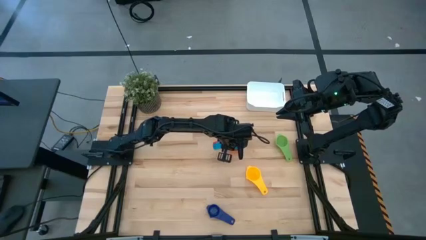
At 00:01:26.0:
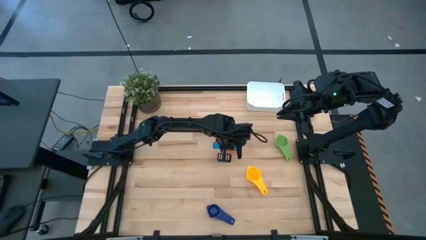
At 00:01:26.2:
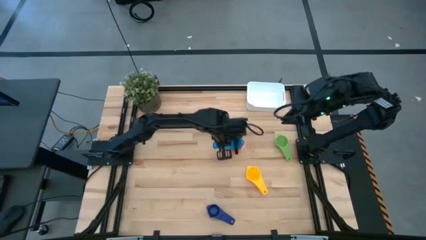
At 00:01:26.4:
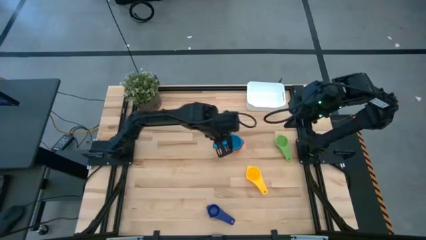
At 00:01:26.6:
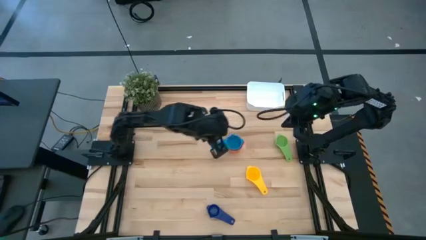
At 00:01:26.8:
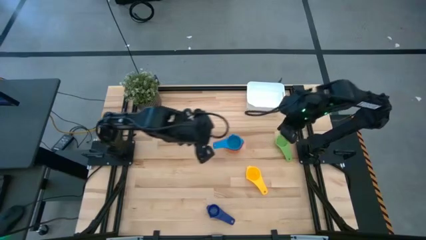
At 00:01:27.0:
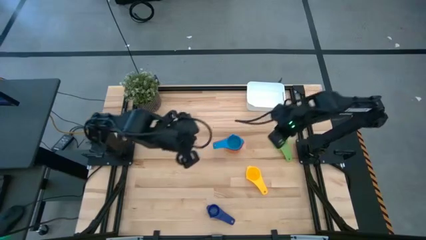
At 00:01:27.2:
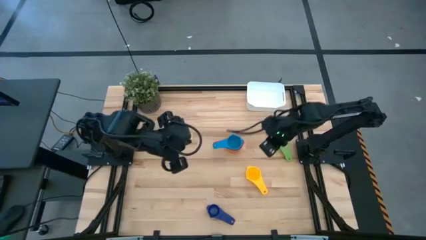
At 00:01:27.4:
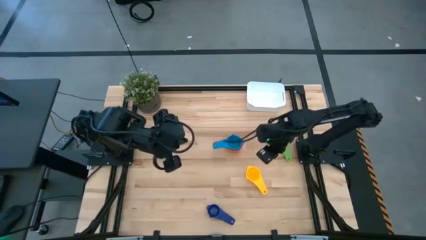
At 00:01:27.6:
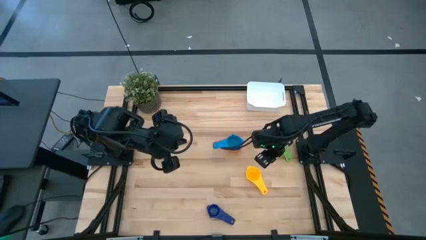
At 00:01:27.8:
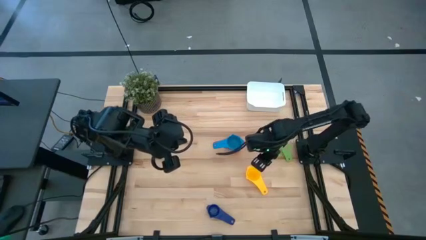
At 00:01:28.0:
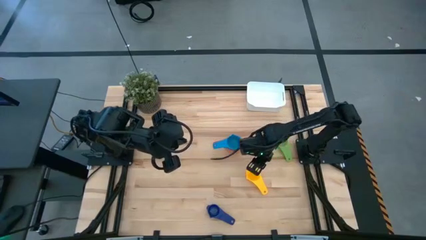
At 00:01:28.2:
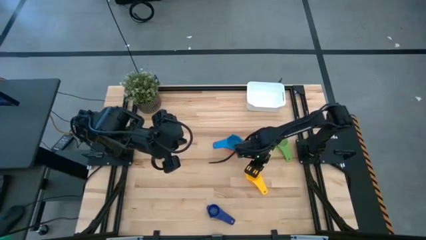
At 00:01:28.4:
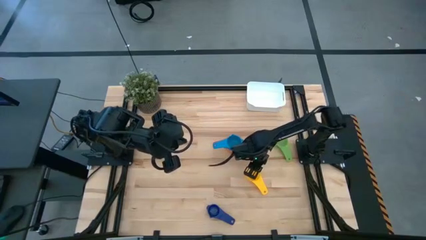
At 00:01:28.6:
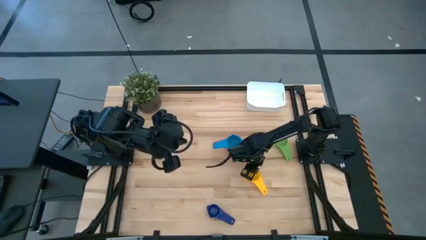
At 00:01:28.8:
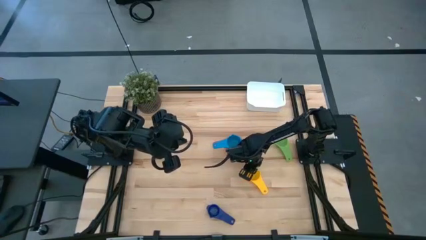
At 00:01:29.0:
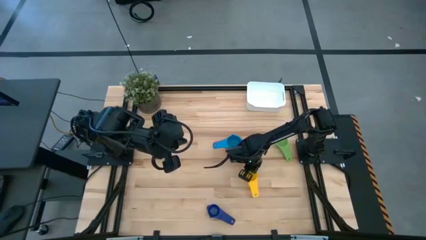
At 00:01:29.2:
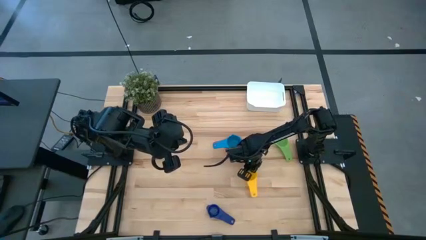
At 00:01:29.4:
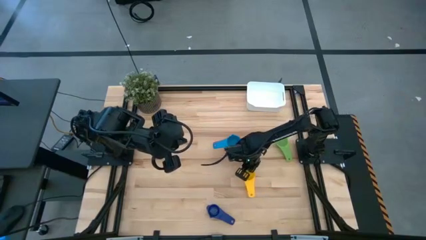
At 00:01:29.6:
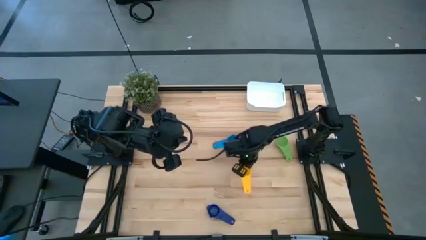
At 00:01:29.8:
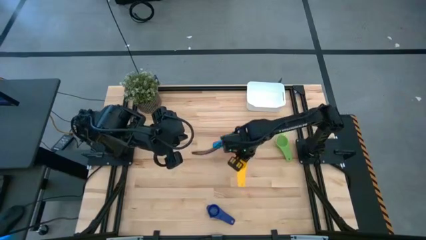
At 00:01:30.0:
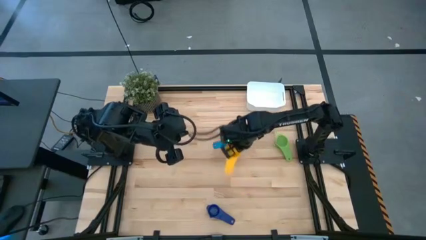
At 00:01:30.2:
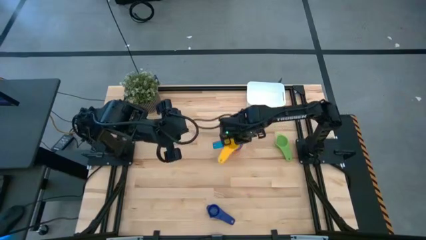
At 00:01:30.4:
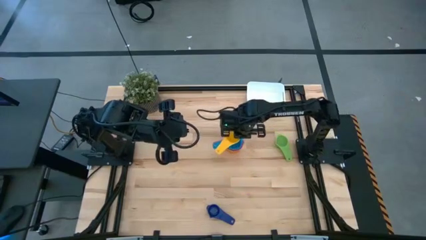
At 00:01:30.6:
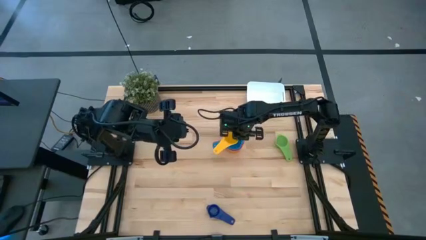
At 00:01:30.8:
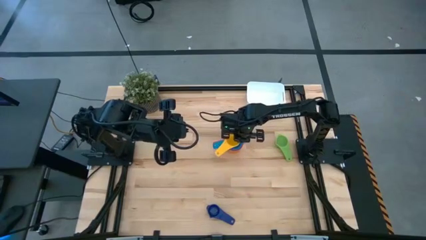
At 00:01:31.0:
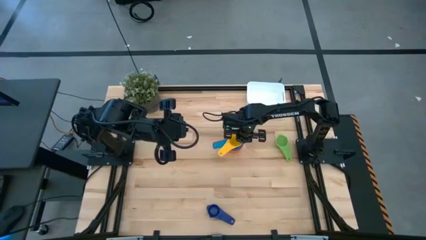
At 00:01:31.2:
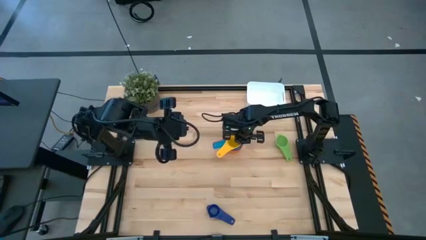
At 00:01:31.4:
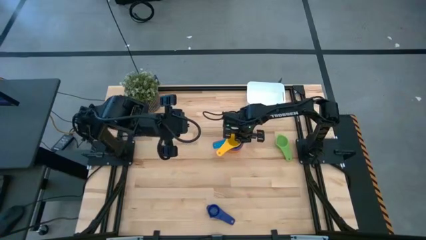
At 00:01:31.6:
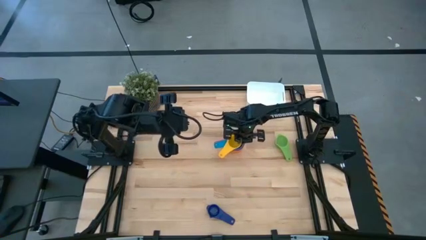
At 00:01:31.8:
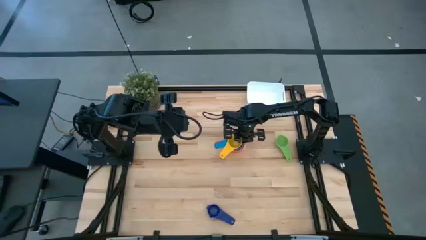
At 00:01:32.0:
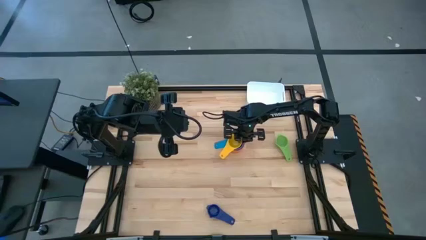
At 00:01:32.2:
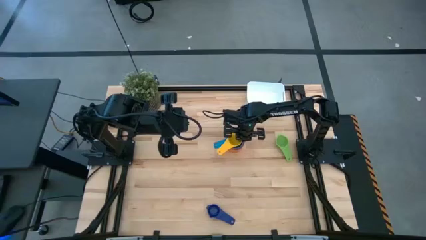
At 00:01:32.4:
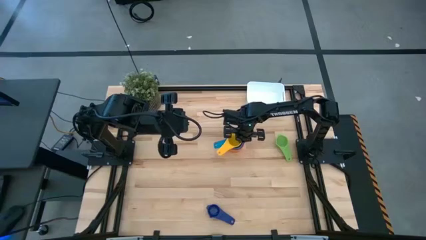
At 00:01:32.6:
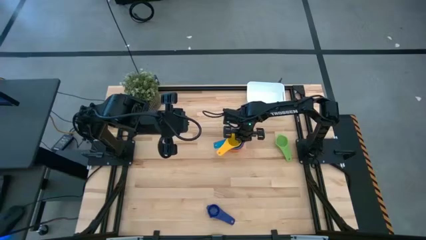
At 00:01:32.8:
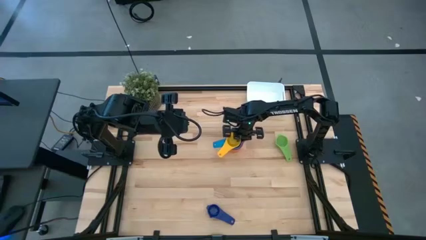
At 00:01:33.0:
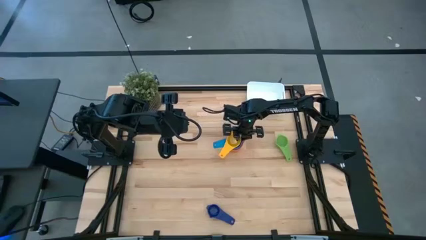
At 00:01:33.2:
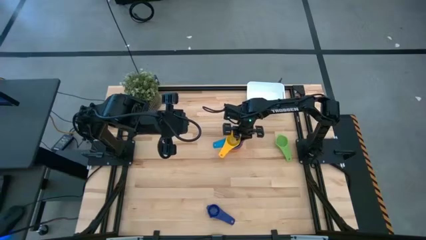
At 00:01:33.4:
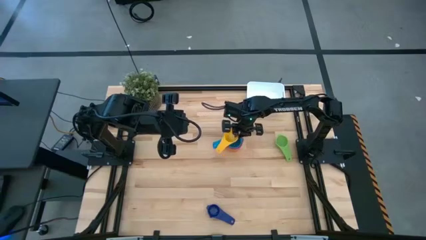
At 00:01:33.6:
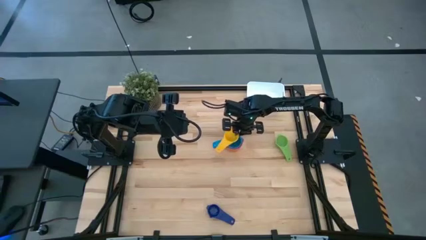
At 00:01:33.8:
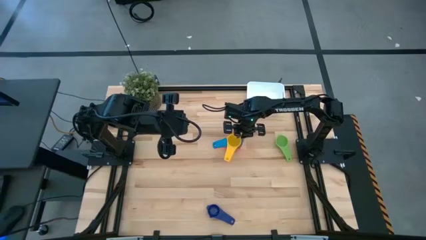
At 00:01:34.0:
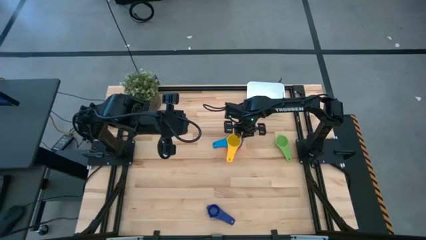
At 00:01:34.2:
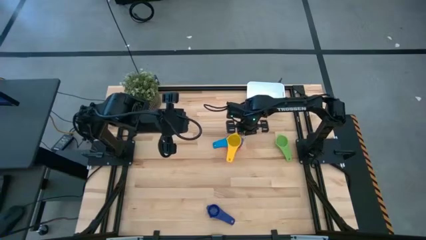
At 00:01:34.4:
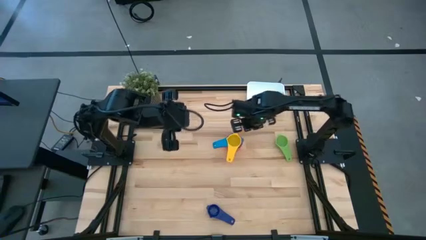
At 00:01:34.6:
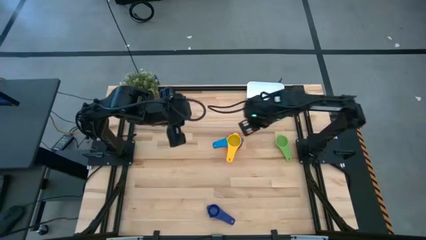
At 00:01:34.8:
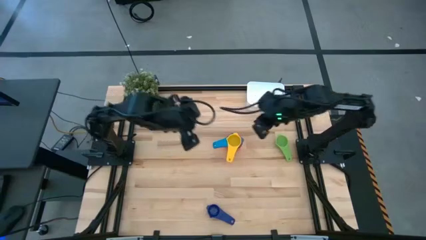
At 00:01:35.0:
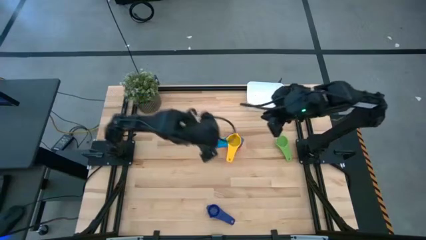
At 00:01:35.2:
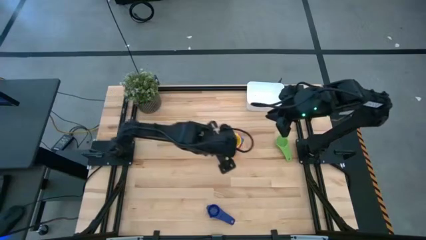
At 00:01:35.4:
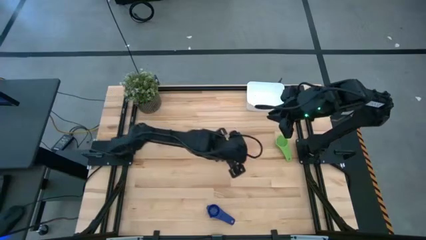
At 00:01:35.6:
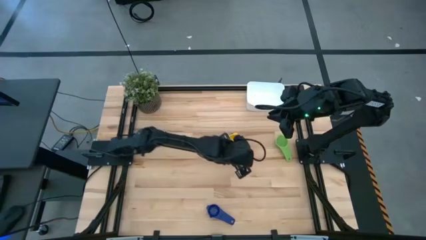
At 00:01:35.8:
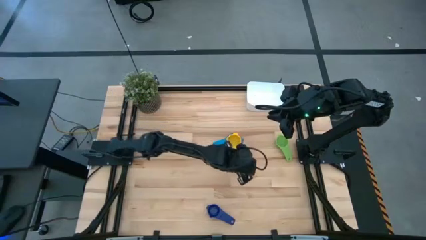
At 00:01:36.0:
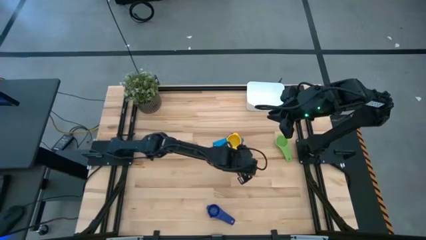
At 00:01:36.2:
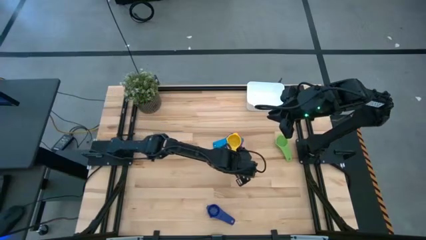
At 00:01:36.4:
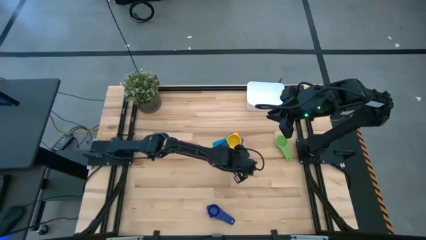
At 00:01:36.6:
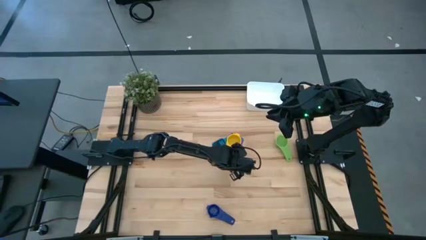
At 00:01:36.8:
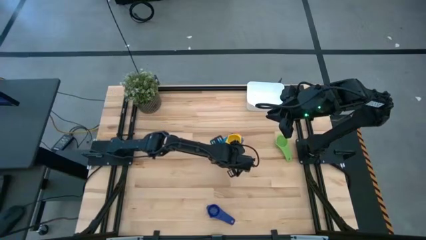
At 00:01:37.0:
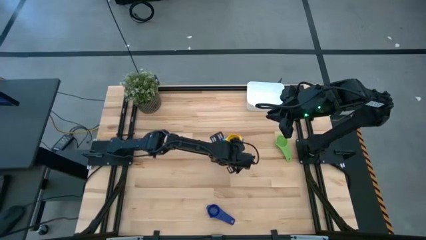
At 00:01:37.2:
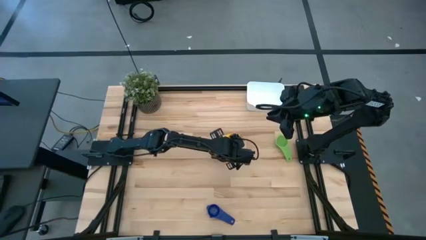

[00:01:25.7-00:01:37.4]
Task: Nest measuring cups in basket
Stack the yellow measuring cup on top of the light blue measuring cup
